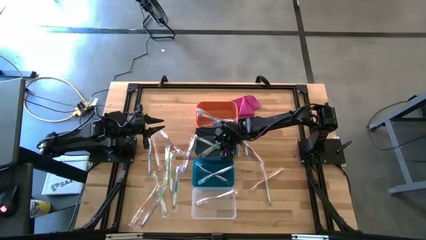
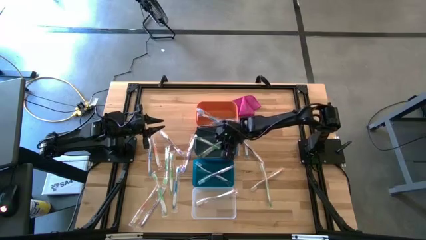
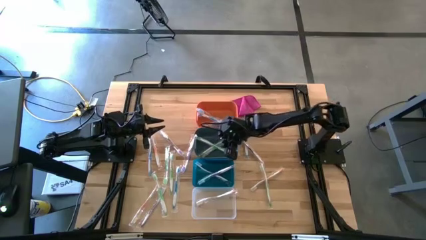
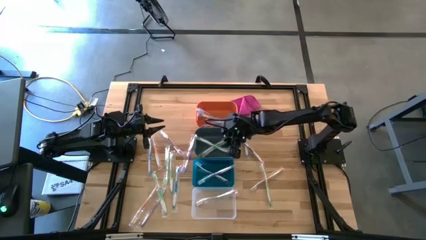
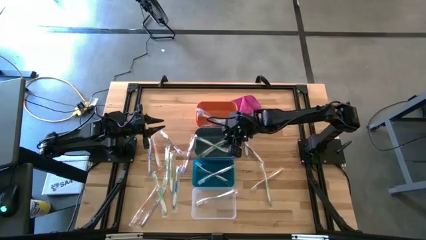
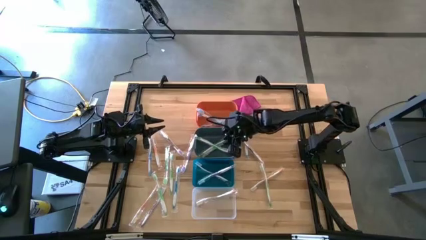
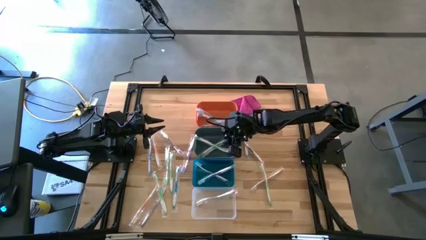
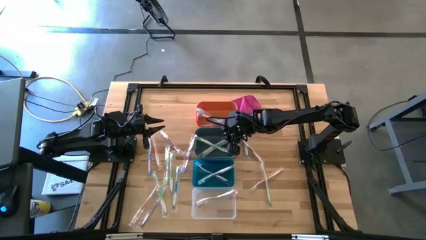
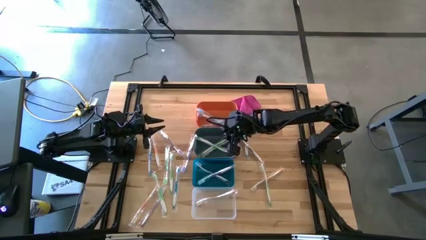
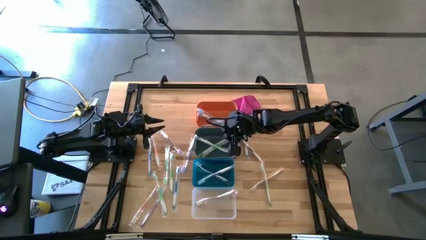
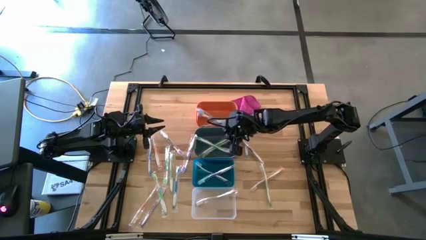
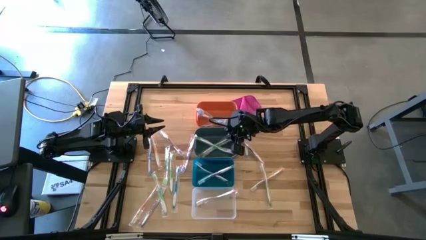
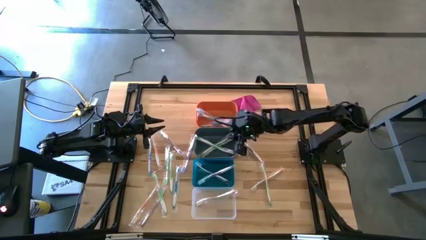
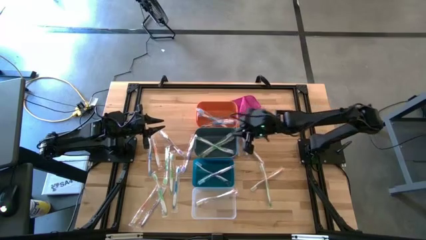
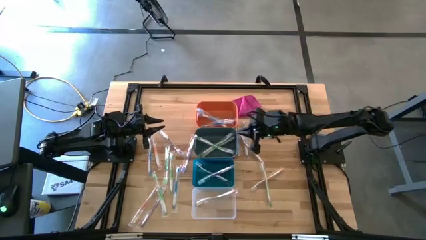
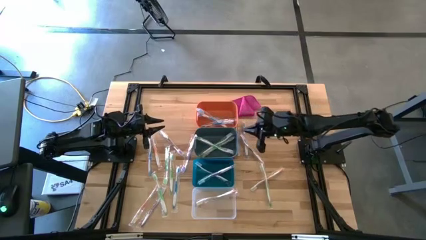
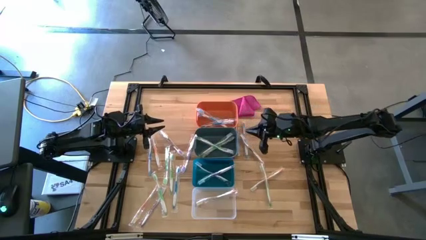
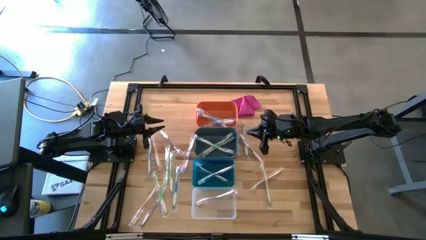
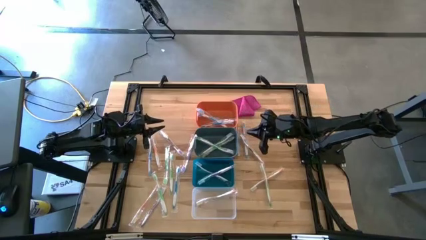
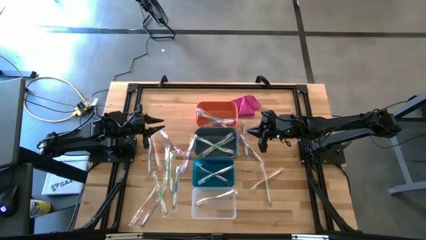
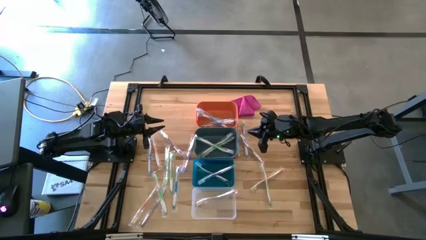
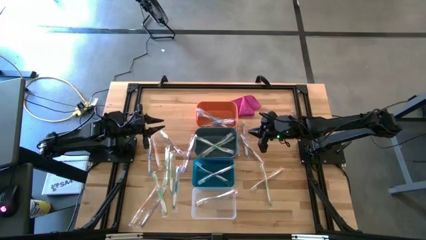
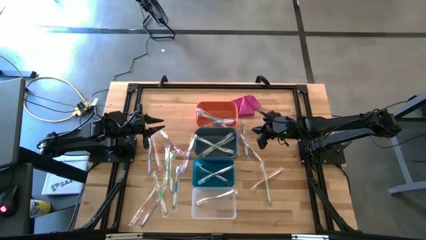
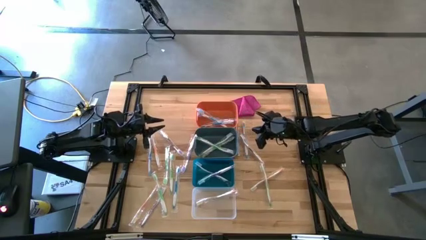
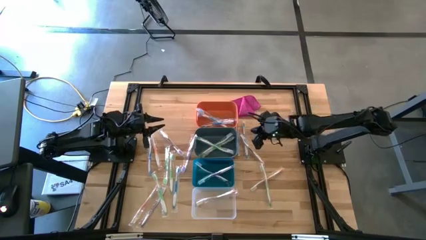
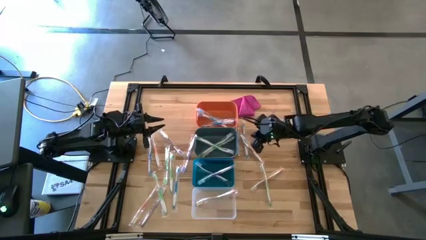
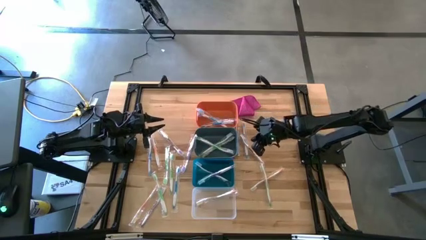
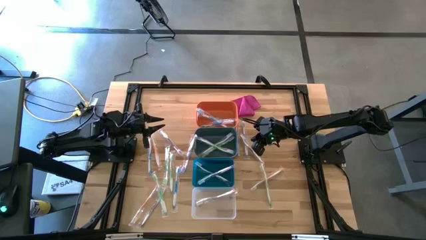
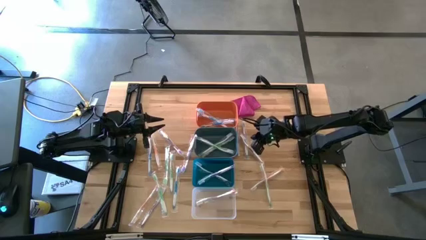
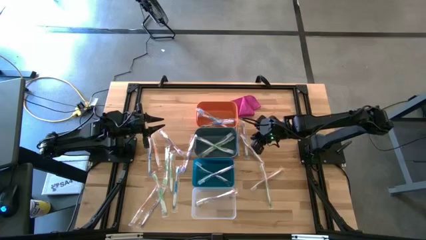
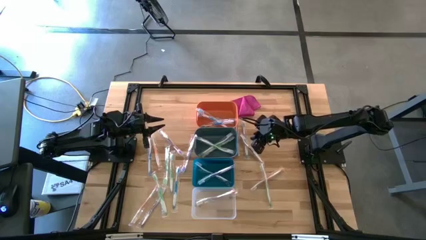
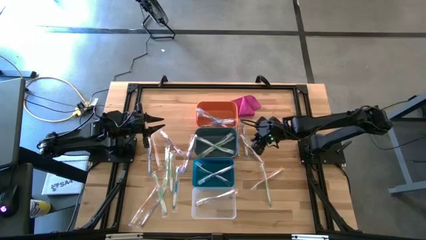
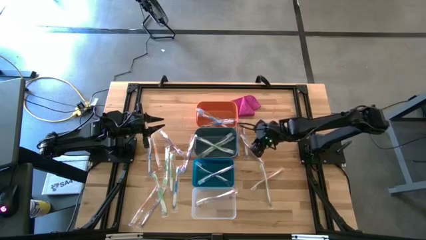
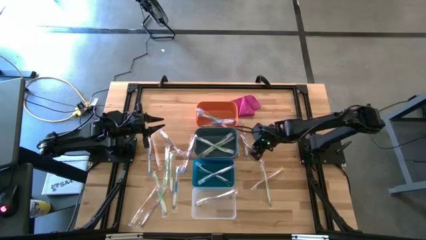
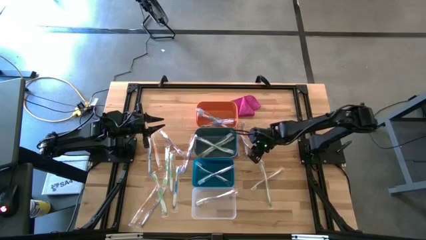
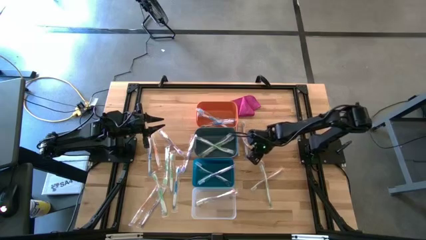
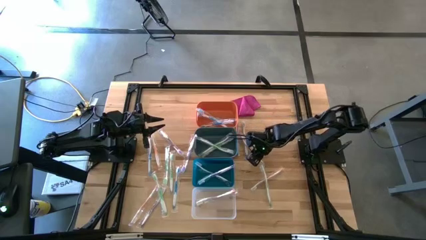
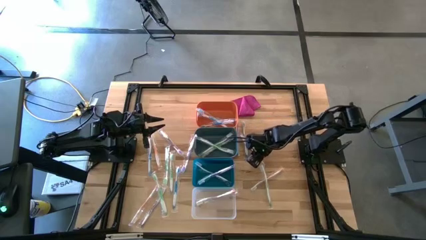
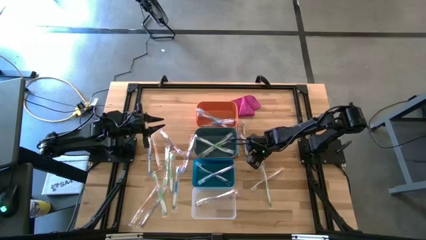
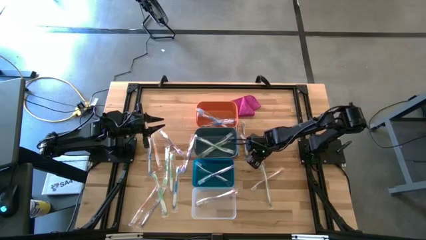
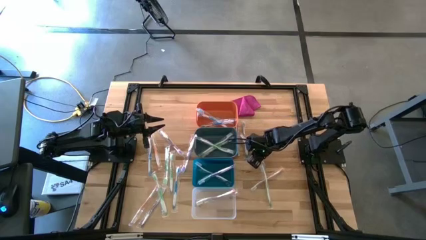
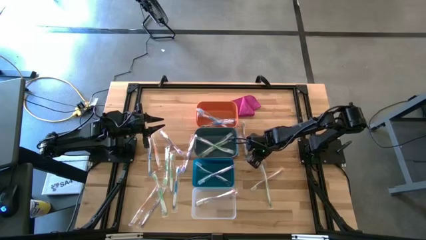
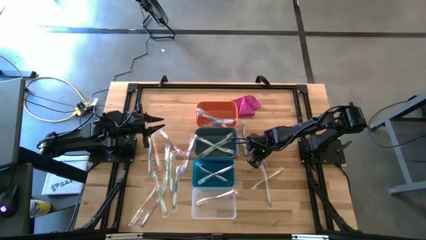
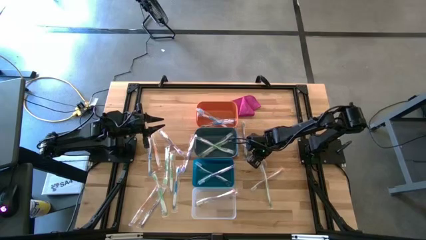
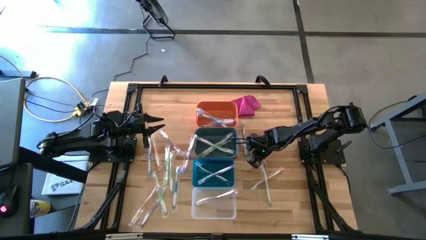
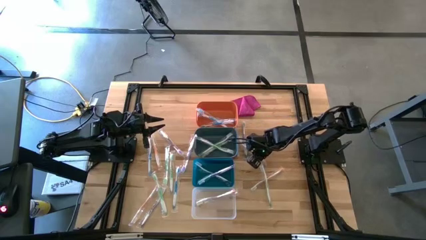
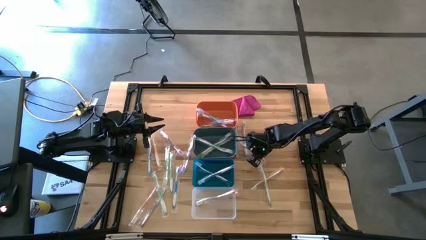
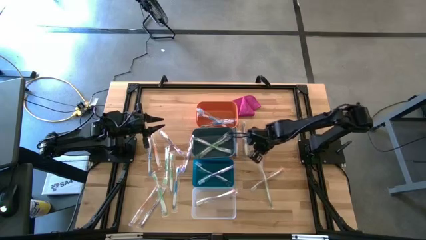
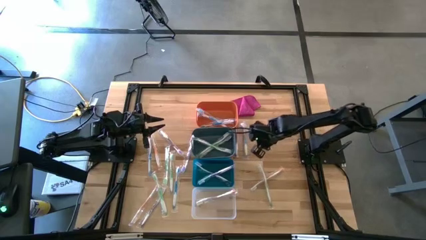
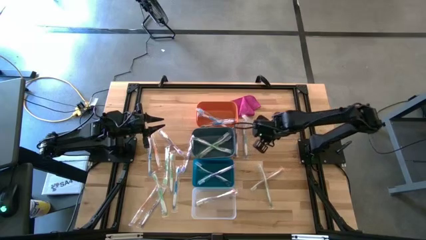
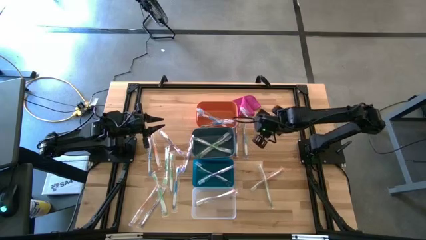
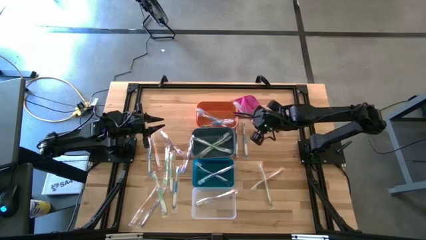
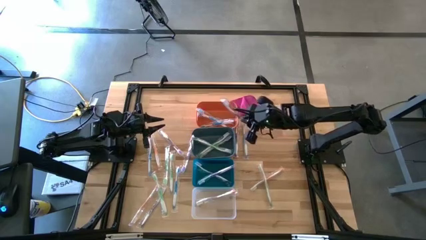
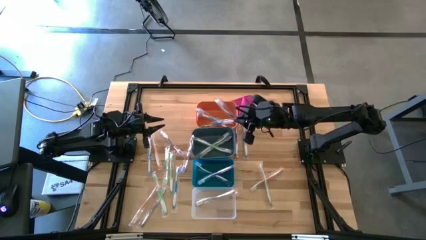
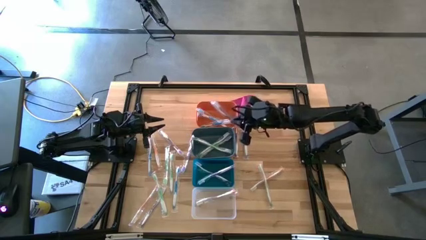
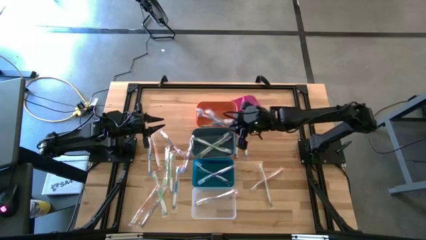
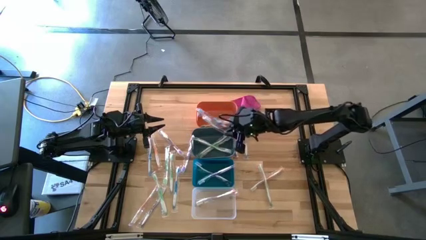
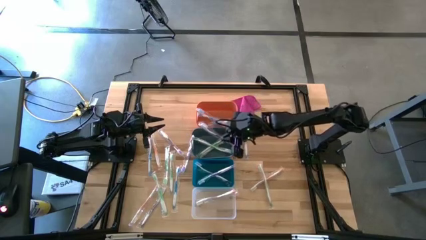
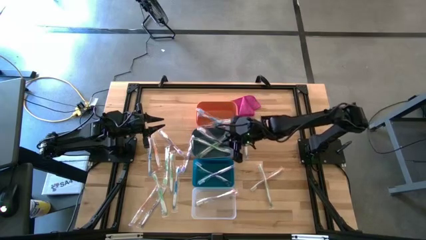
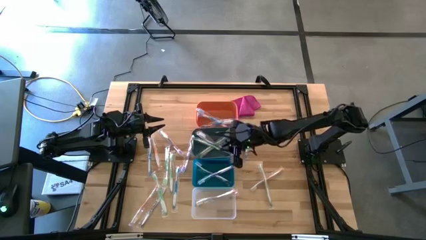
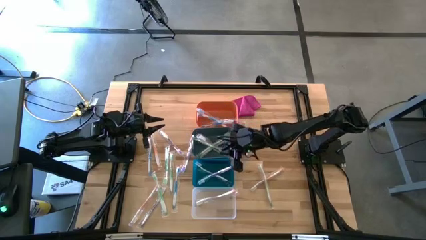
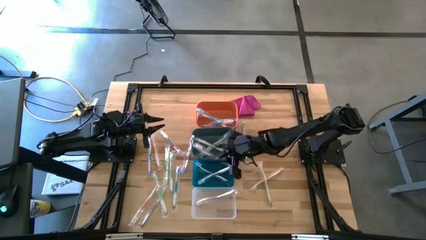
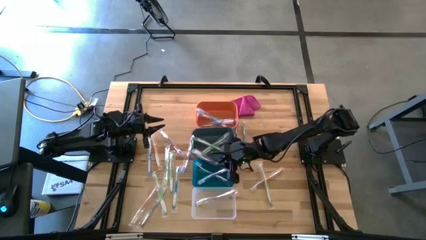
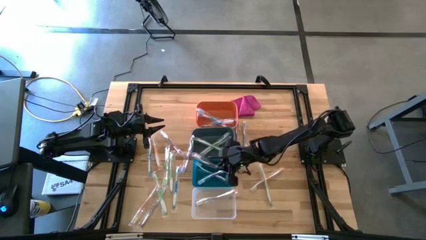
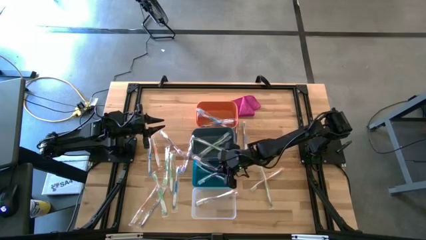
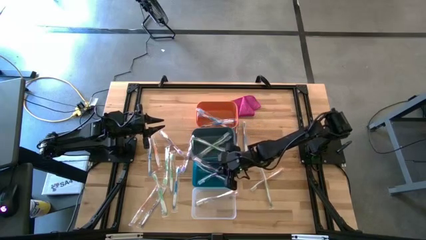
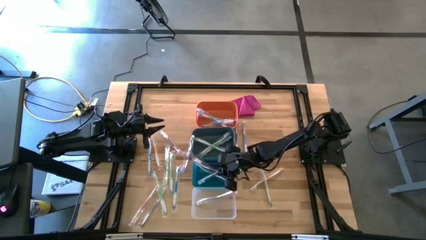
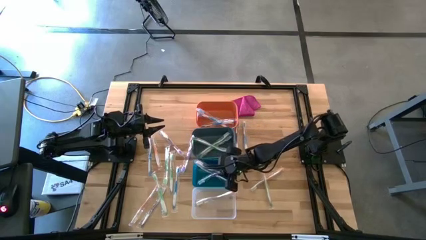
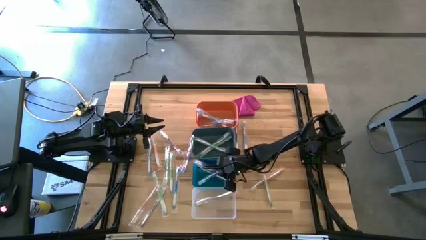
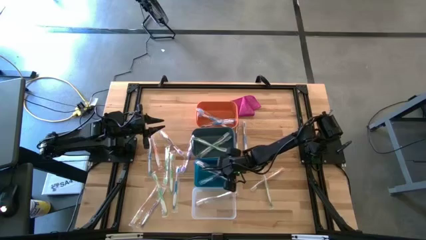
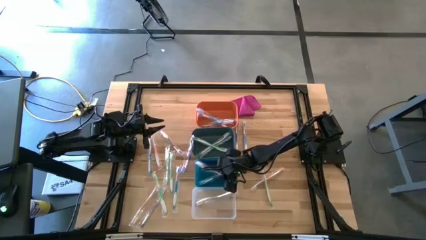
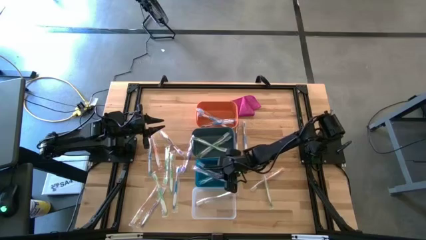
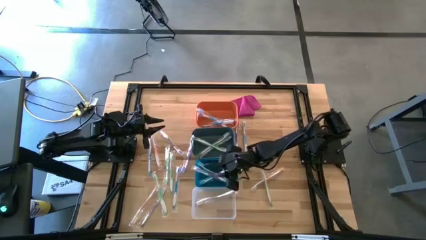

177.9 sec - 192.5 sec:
Task: Pick & Place Toothbrushes
Put the purple toothbrush into the blue bin

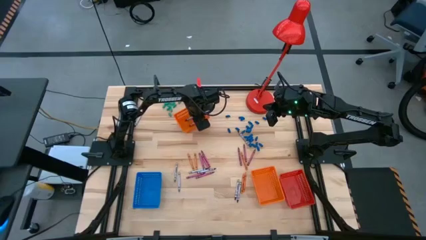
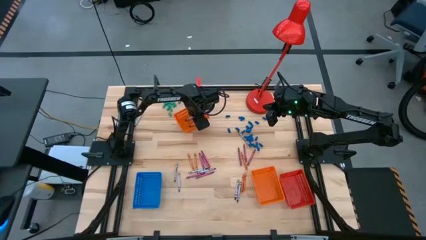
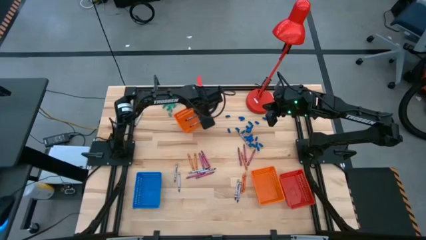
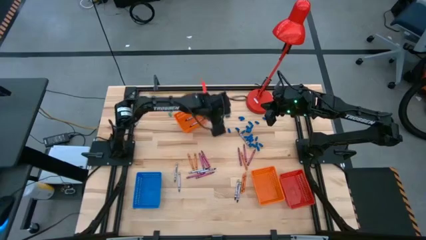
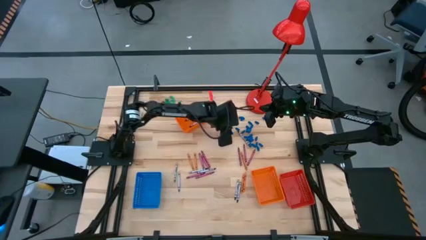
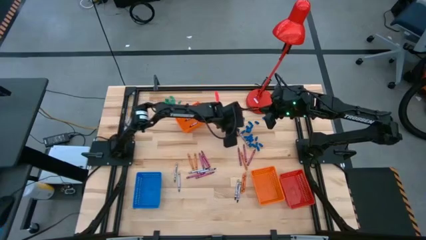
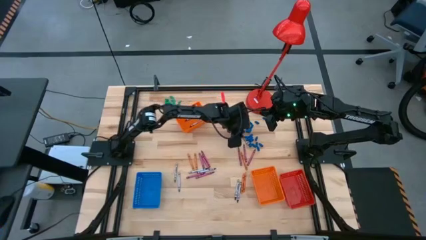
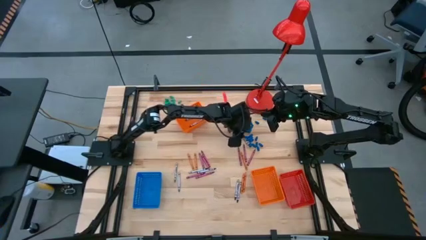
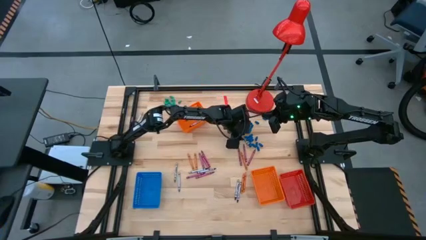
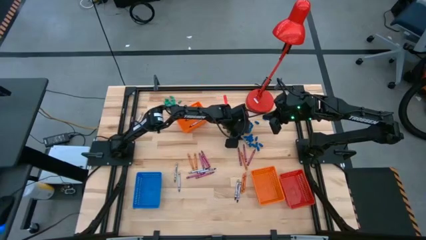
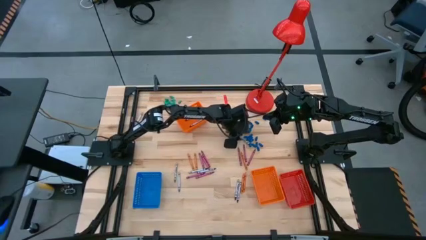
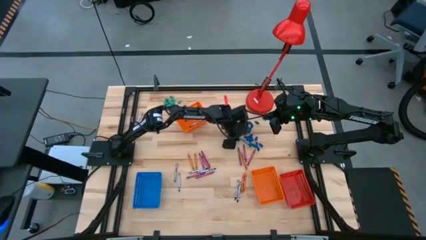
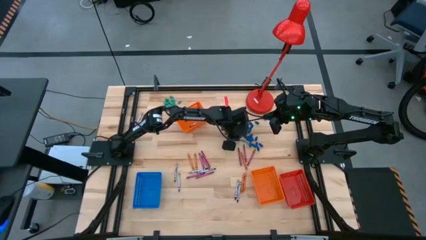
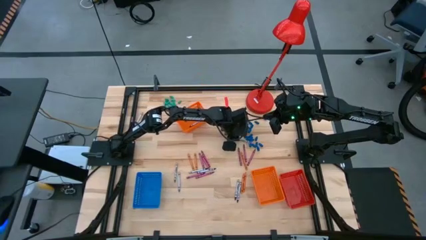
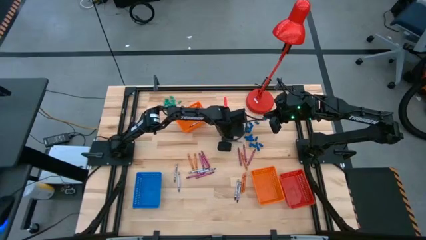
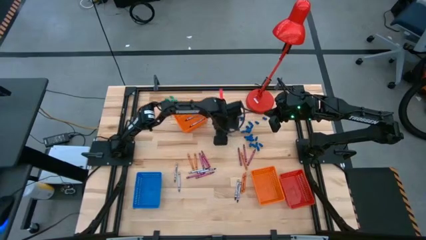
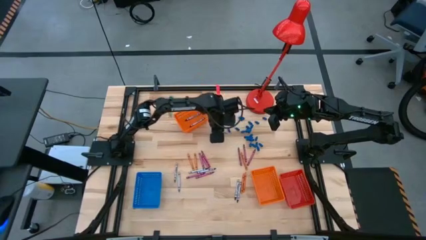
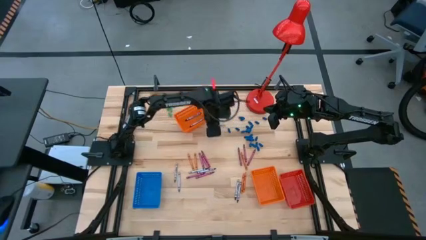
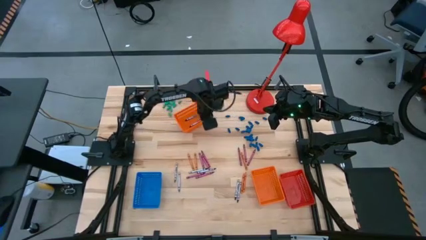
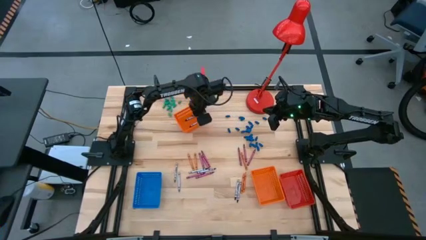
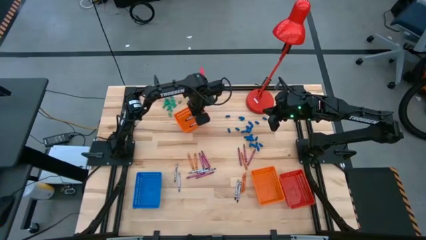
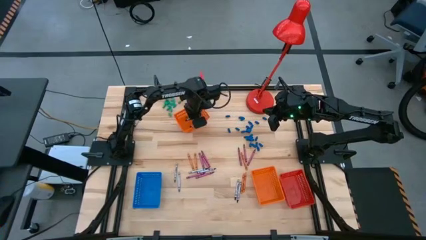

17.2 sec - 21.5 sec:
Task: Sort crayons
Put the black crayon into the top orange bin
